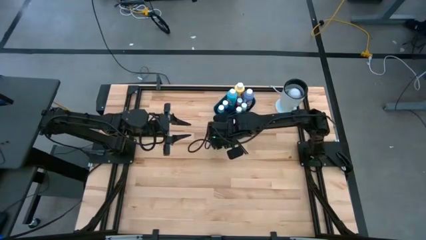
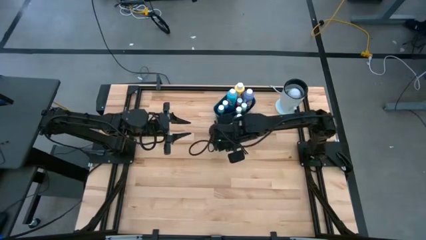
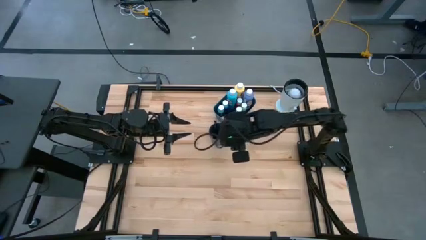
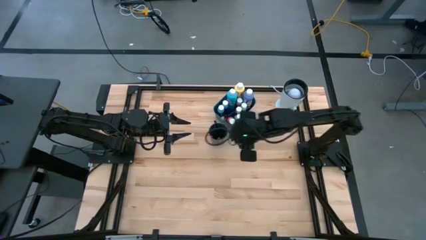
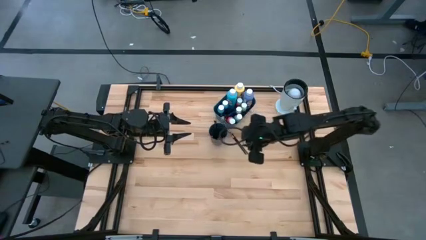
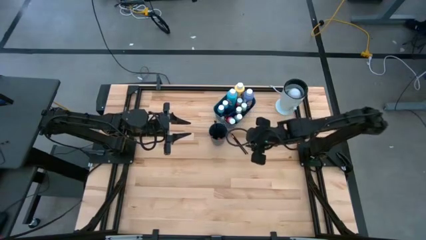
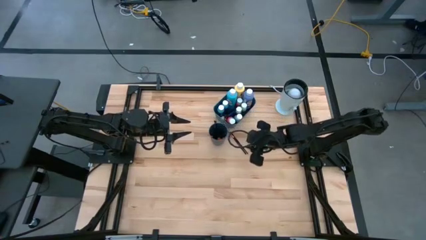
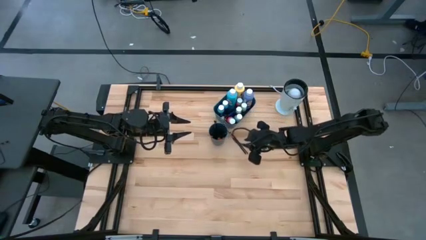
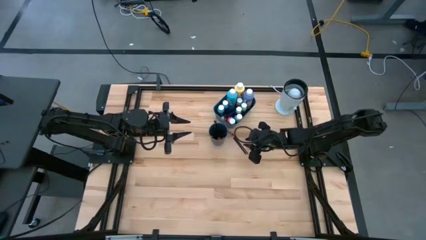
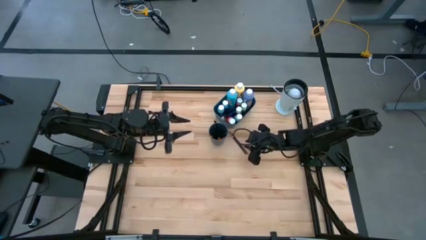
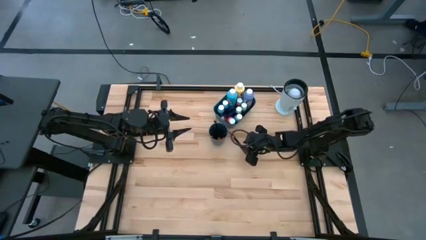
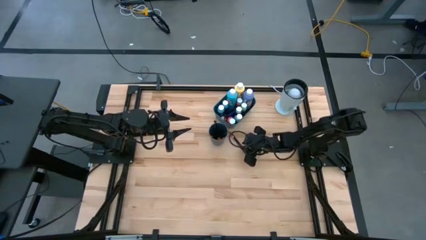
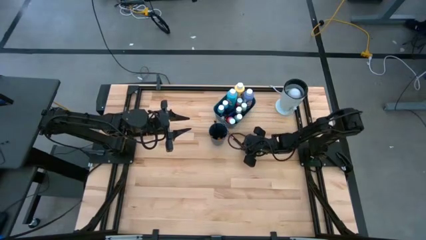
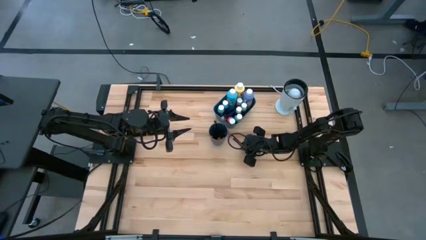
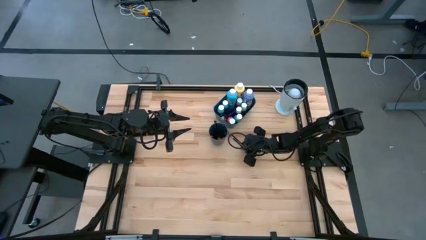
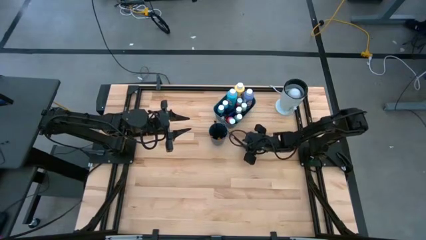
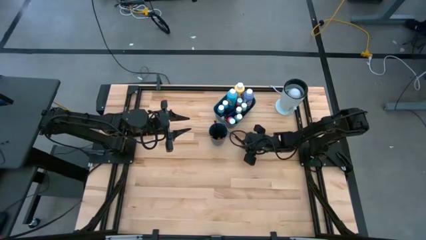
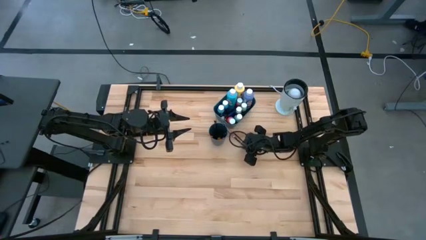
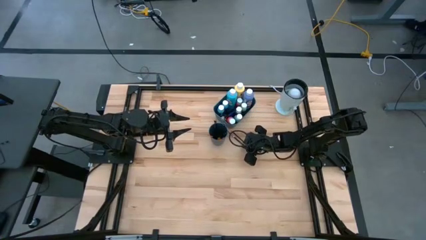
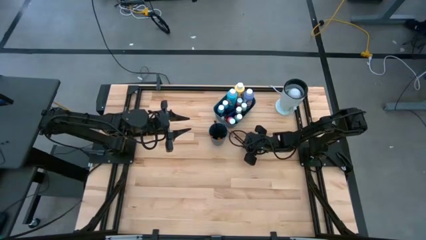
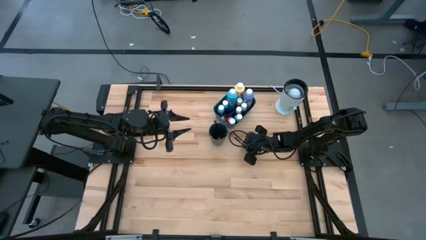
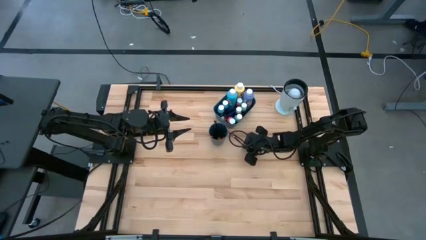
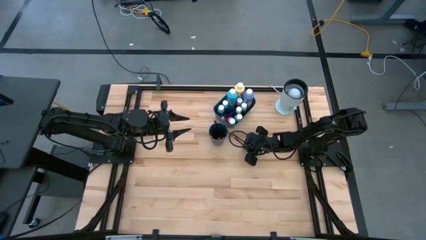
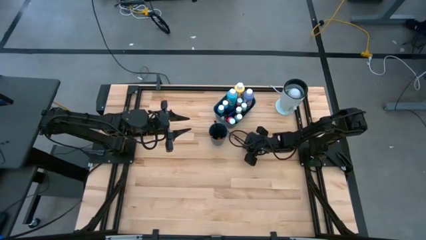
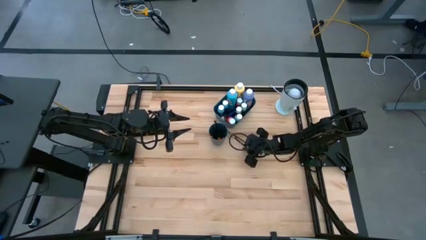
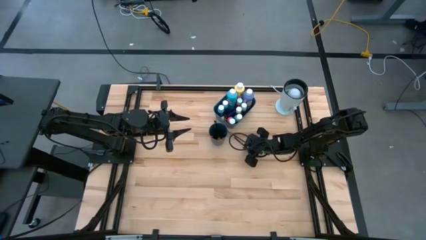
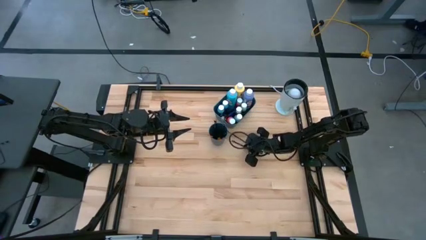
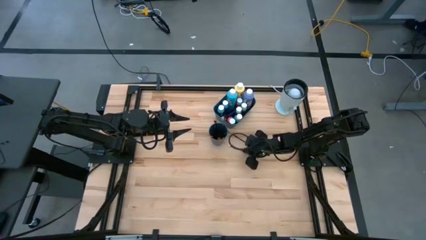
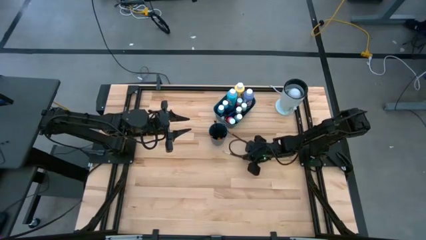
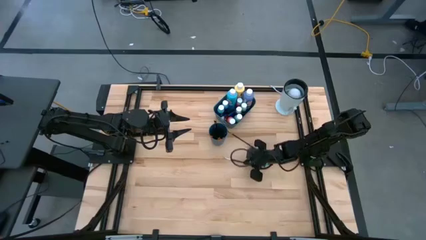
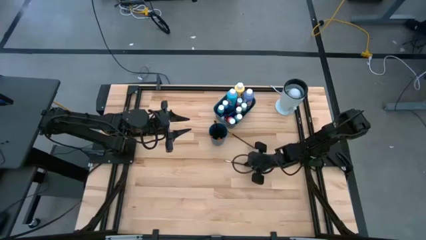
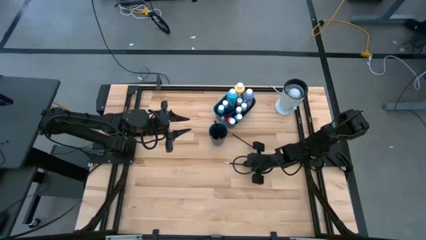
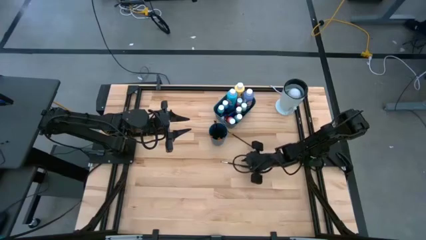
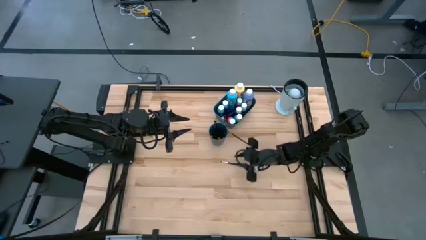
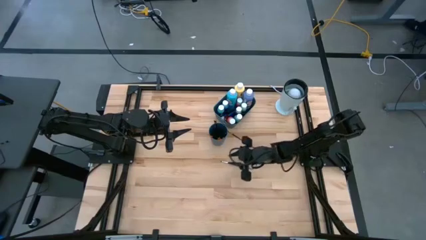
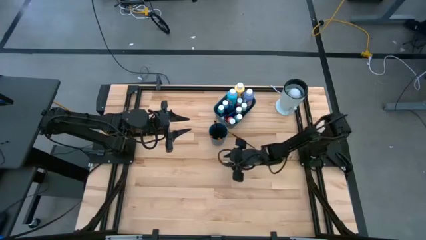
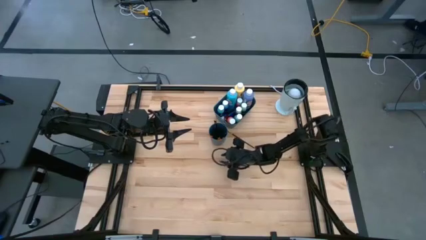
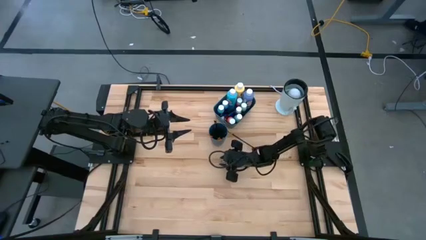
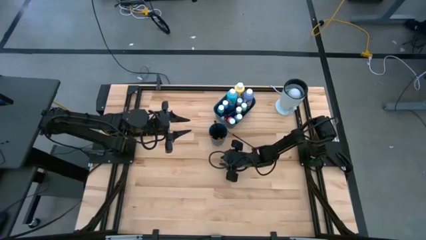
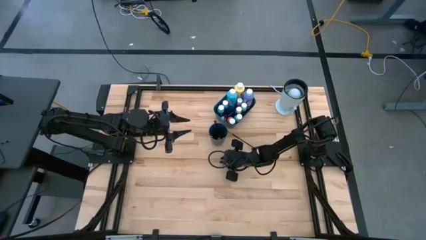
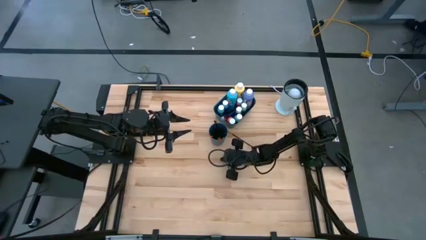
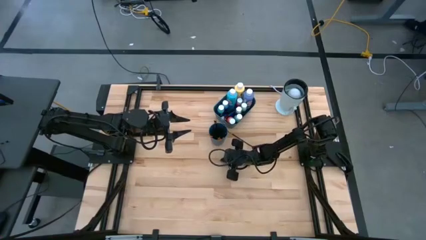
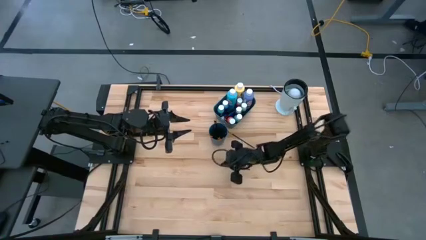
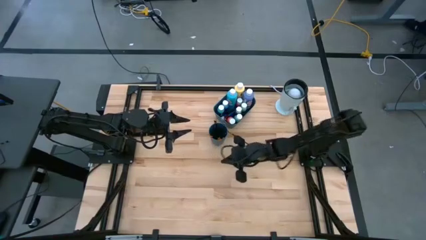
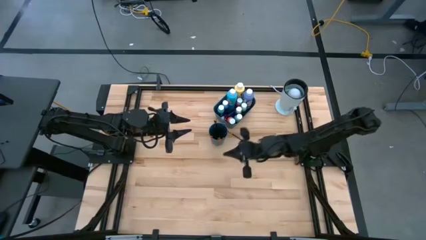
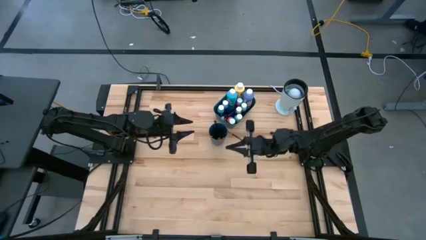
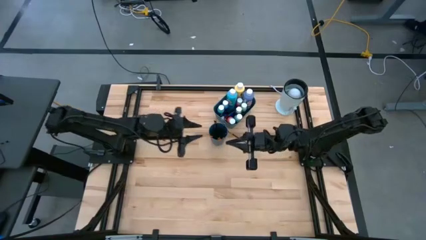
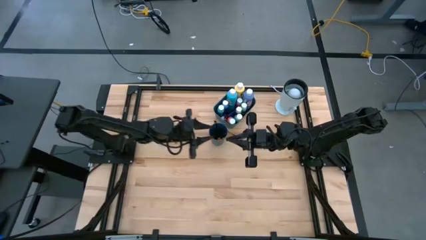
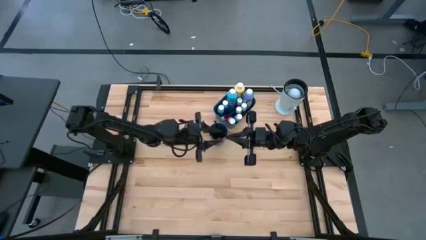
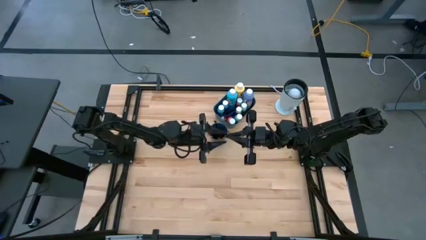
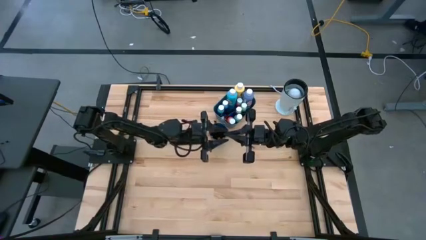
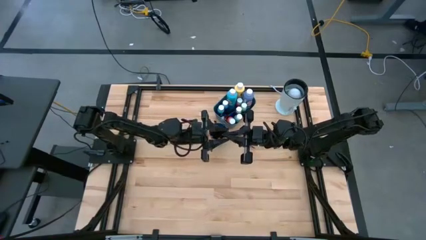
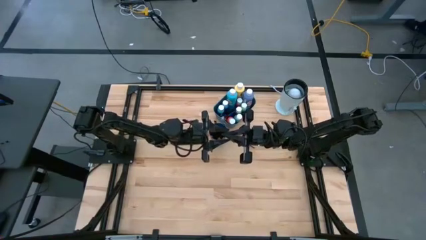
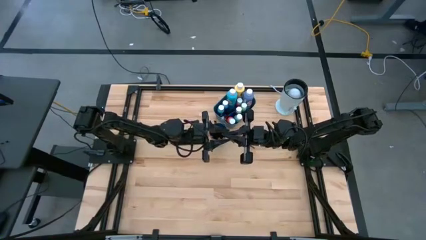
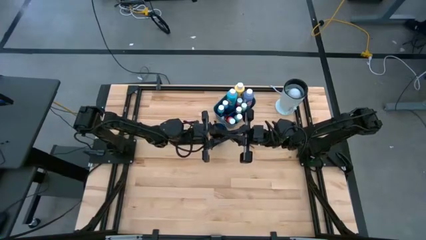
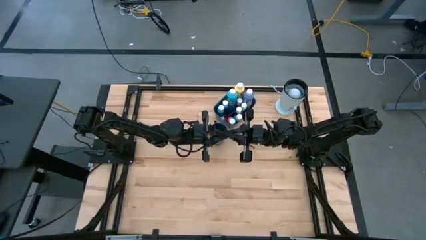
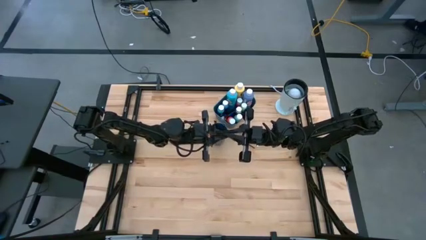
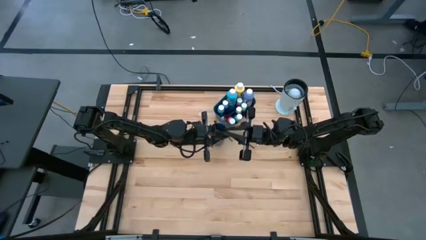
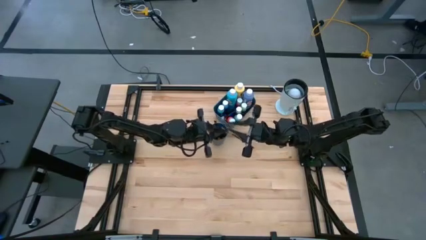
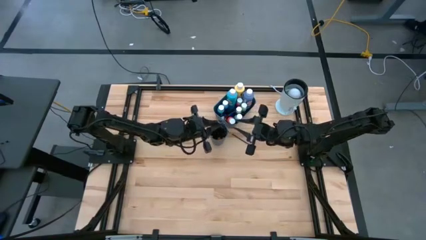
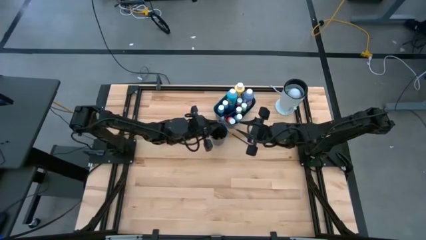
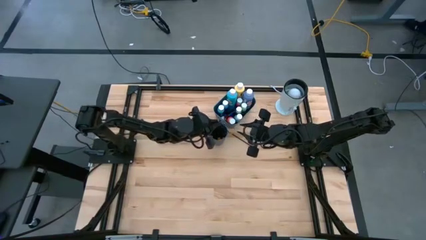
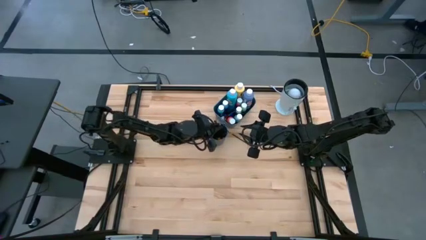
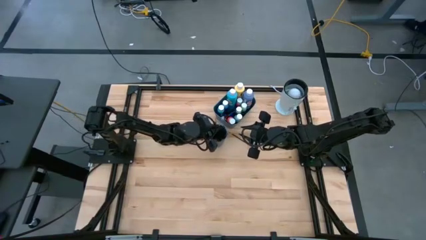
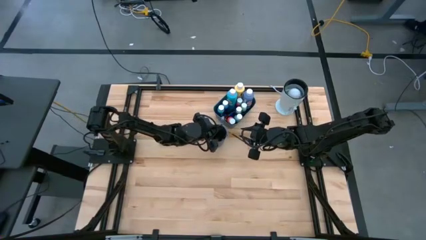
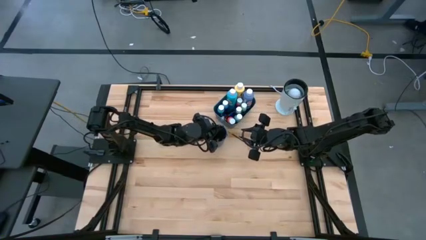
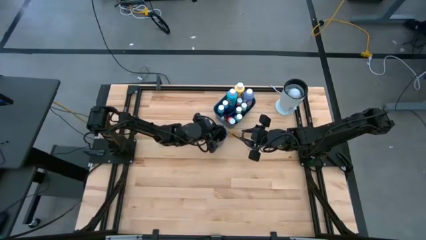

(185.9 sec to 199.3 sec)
Task: Pick & Place Paint Supplies
Put the silver paint brush into the blue cup

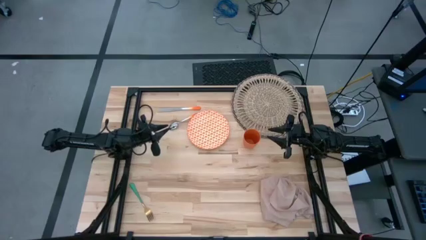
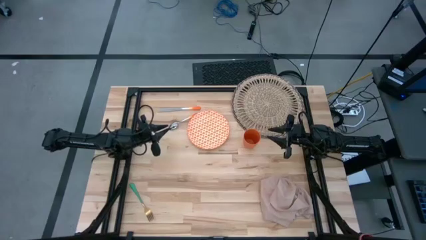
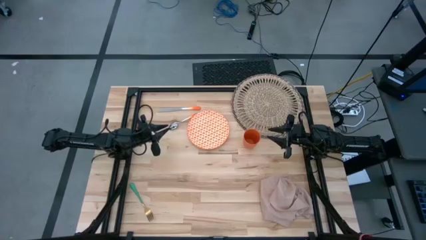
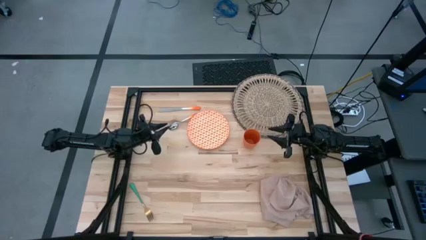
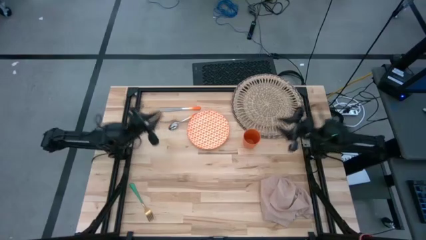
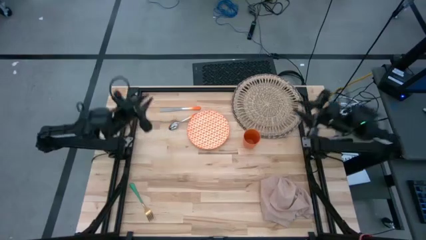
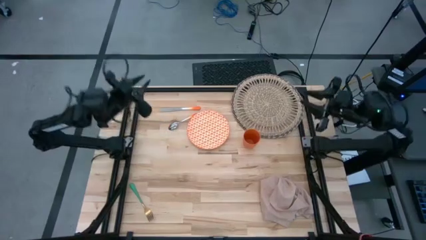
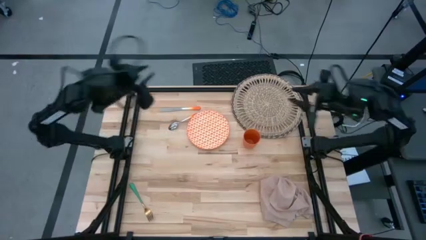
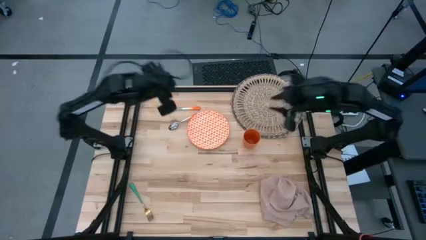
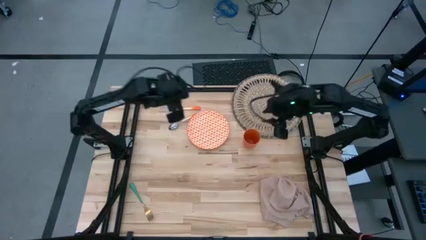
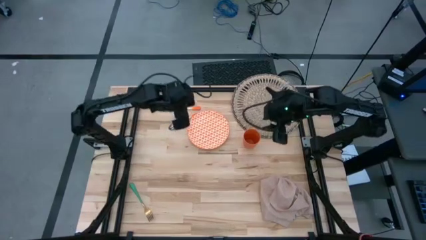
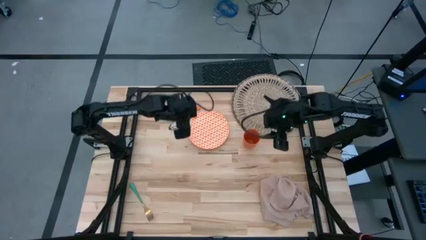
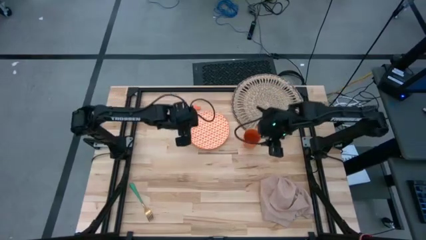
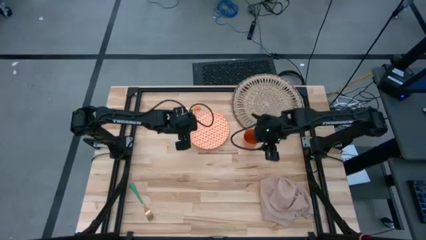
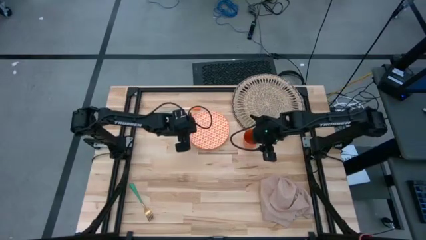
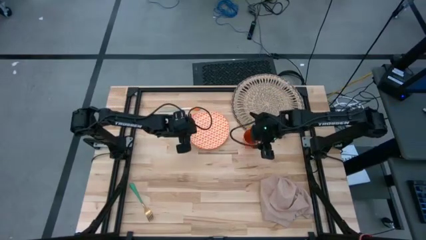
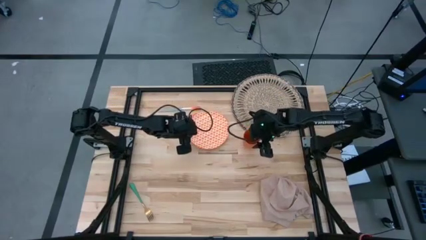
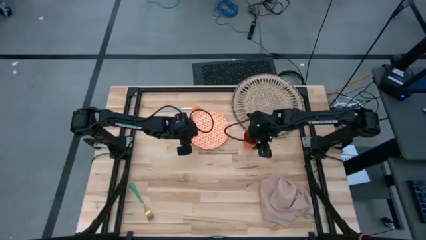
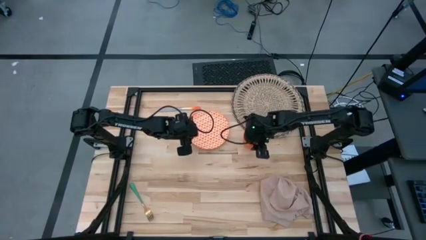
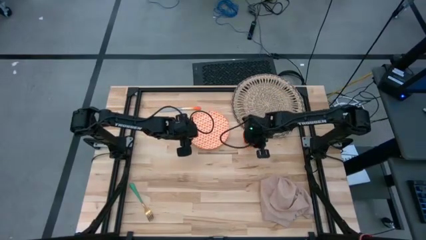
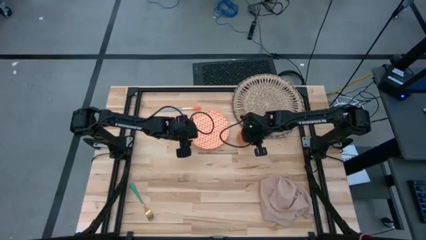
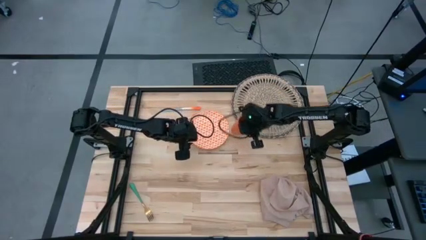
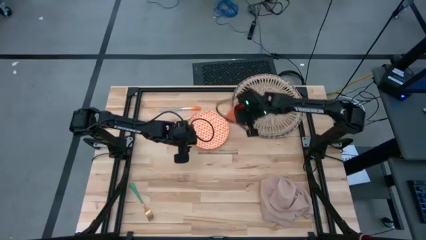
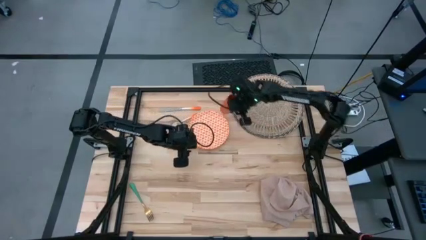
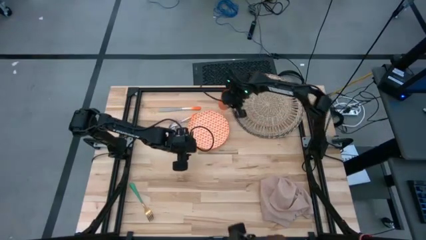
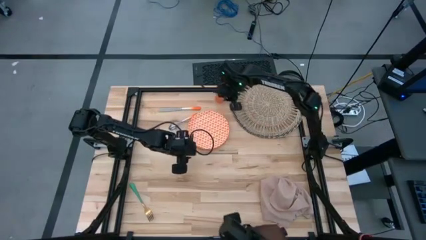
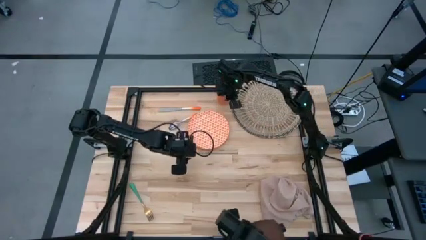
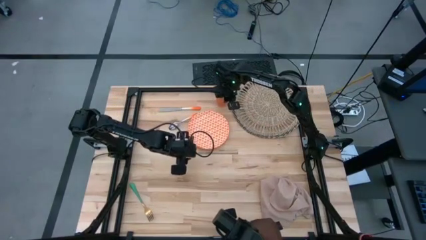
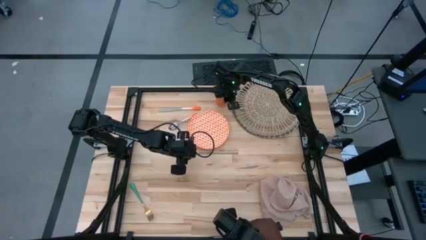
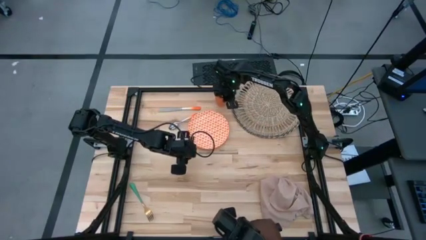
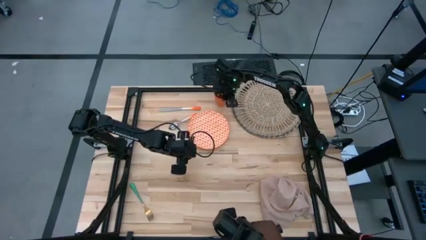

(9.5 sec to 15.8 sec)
Task: Set table place
Move the cup to the top middle of the table
